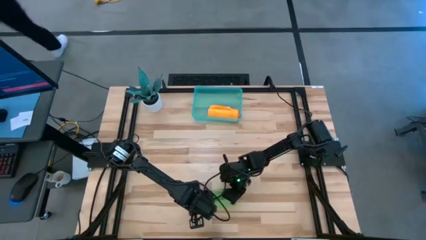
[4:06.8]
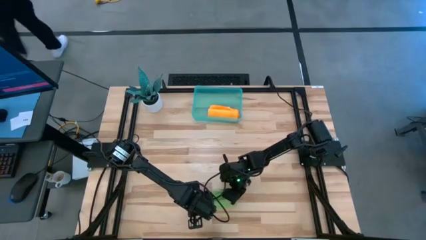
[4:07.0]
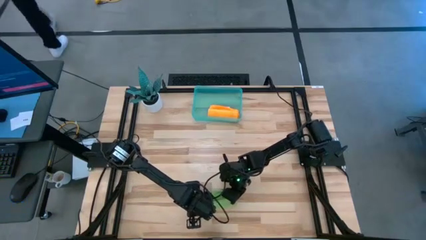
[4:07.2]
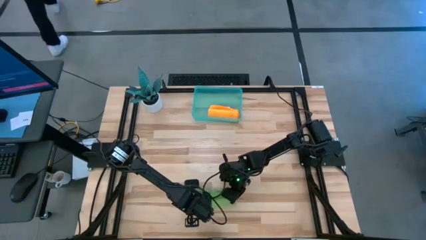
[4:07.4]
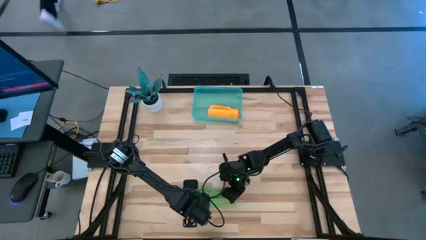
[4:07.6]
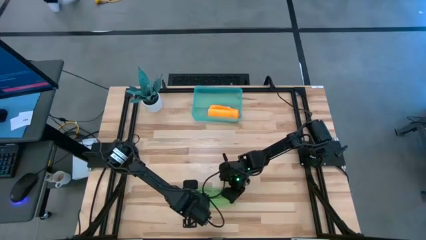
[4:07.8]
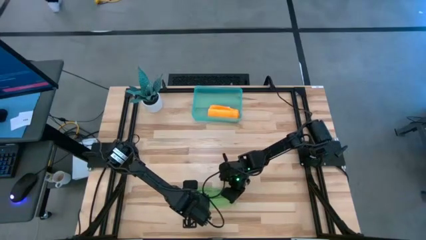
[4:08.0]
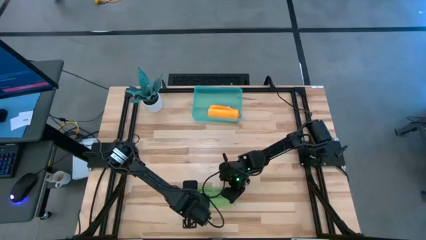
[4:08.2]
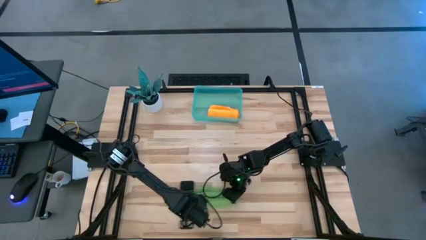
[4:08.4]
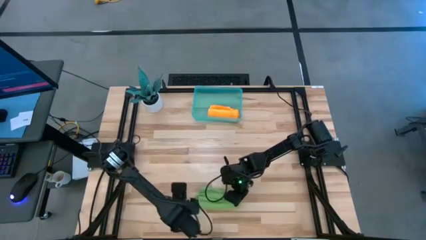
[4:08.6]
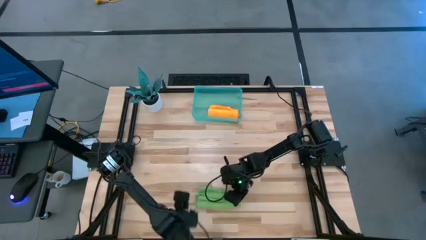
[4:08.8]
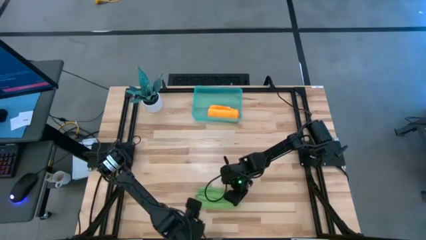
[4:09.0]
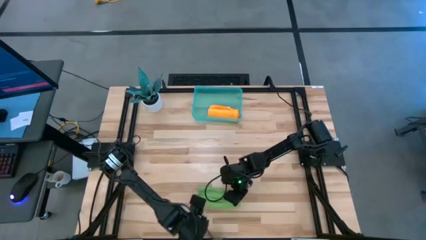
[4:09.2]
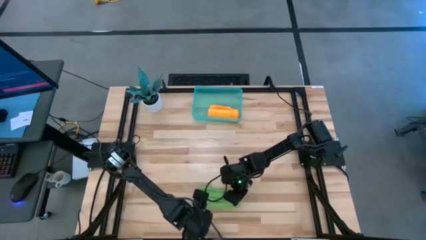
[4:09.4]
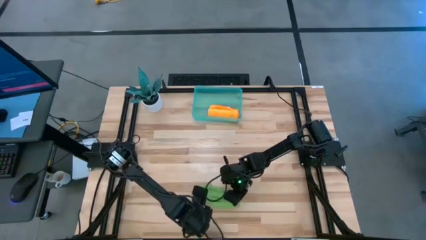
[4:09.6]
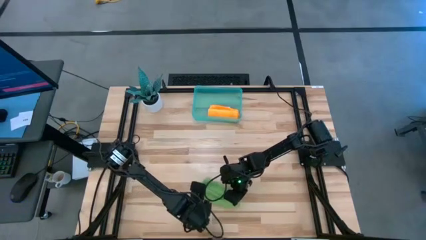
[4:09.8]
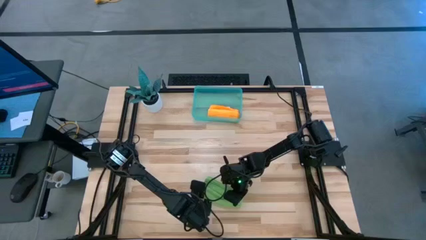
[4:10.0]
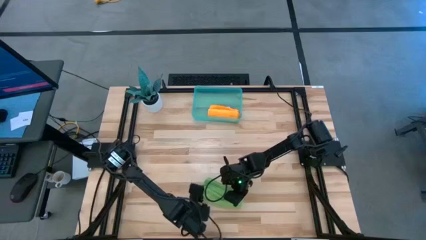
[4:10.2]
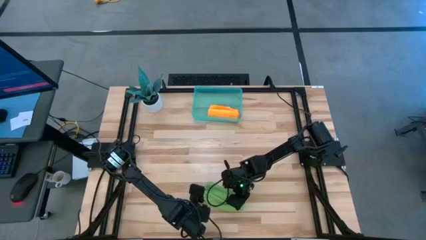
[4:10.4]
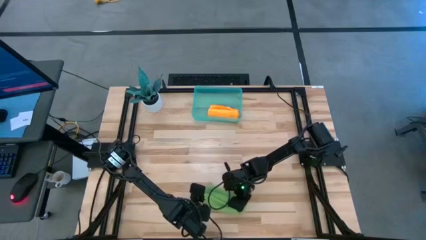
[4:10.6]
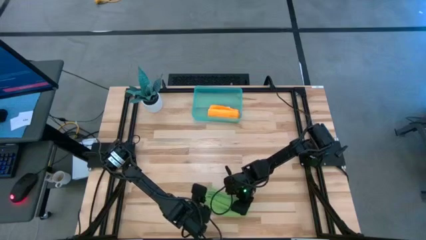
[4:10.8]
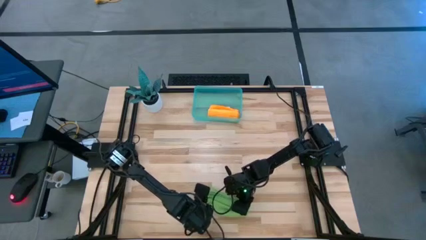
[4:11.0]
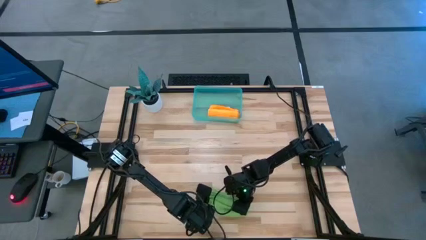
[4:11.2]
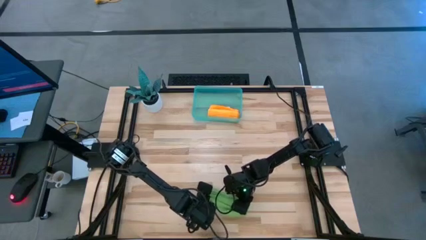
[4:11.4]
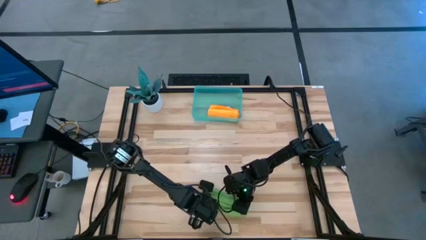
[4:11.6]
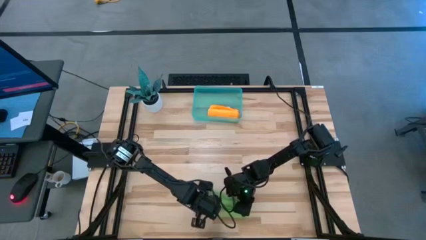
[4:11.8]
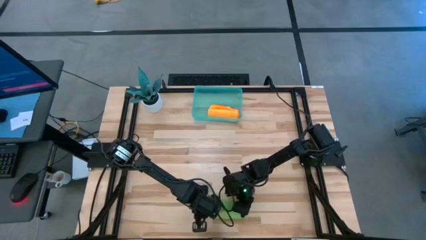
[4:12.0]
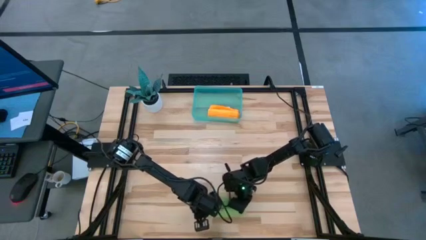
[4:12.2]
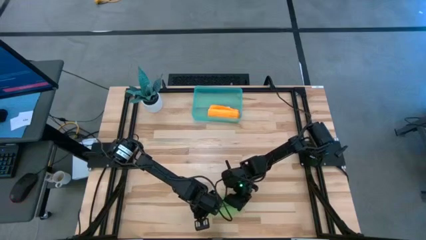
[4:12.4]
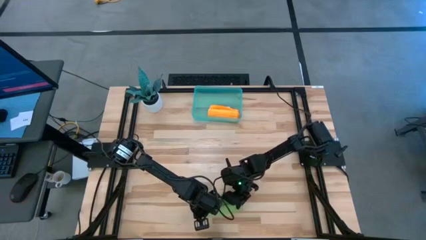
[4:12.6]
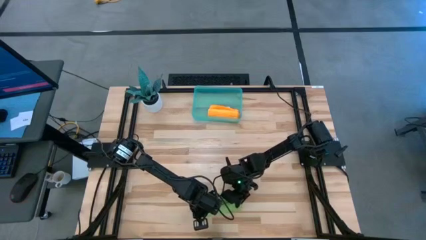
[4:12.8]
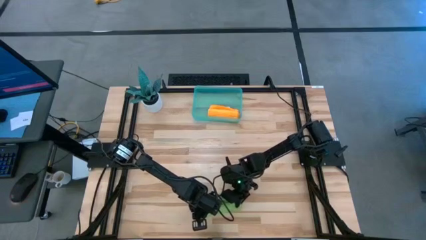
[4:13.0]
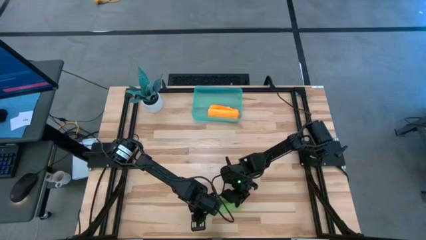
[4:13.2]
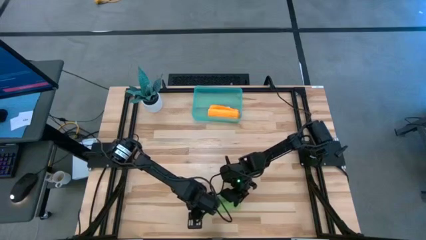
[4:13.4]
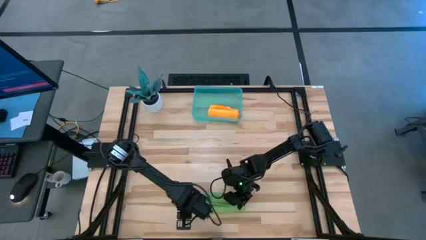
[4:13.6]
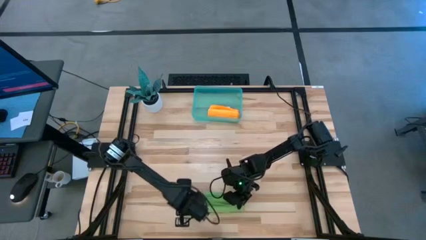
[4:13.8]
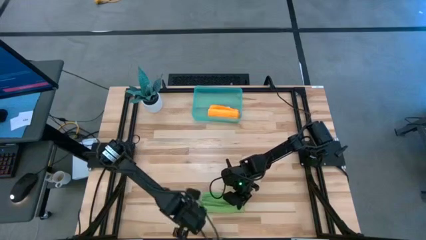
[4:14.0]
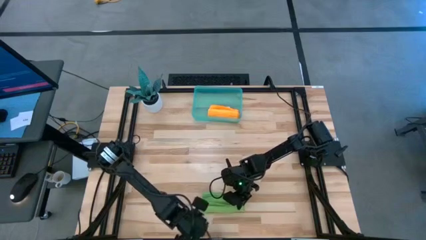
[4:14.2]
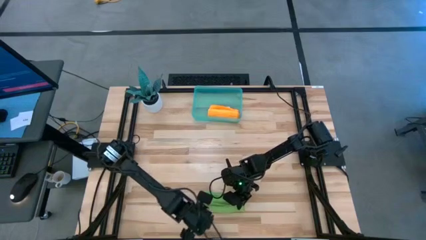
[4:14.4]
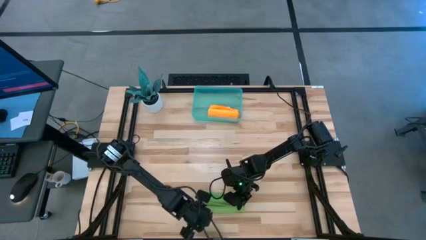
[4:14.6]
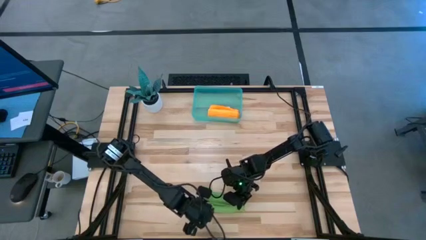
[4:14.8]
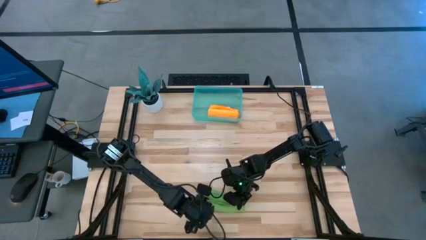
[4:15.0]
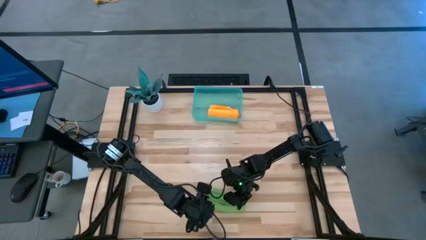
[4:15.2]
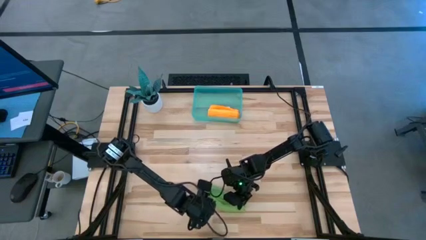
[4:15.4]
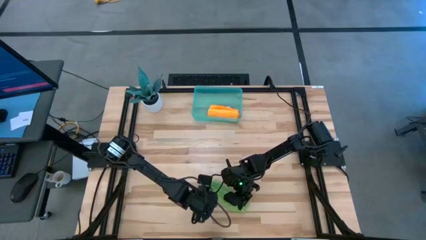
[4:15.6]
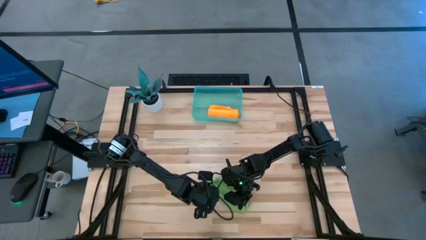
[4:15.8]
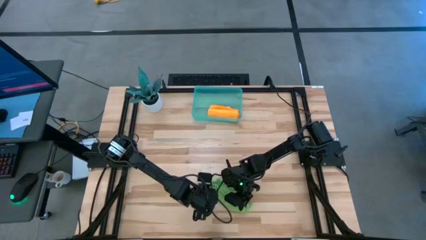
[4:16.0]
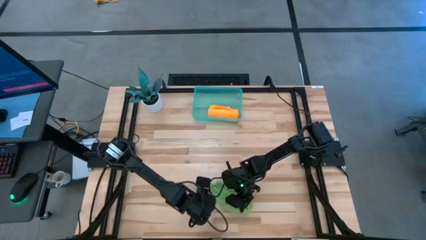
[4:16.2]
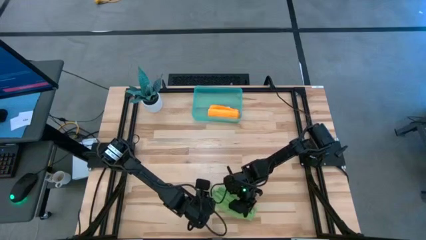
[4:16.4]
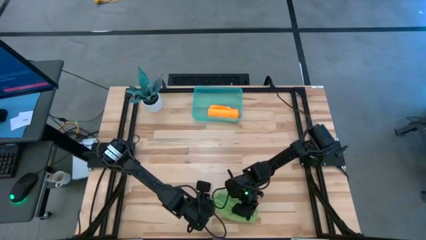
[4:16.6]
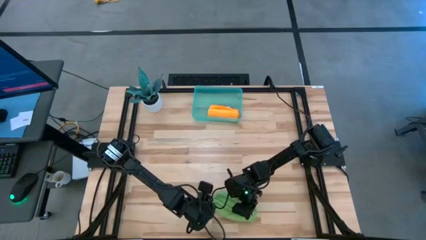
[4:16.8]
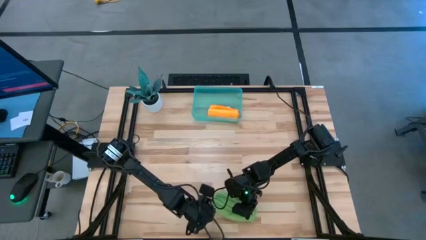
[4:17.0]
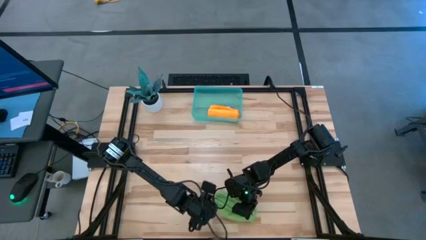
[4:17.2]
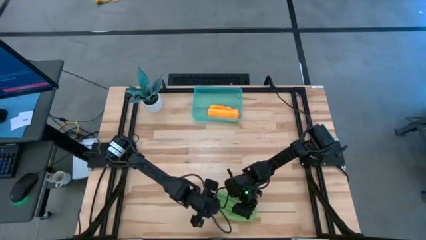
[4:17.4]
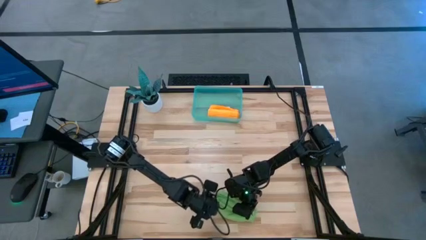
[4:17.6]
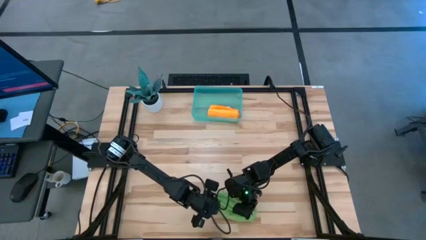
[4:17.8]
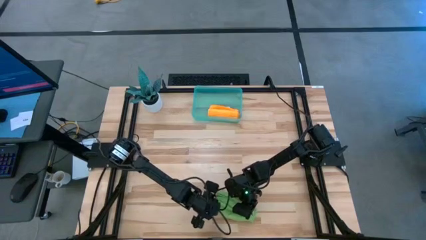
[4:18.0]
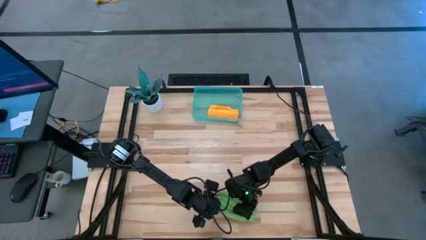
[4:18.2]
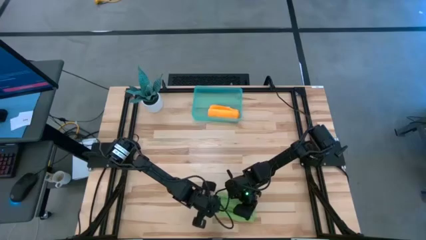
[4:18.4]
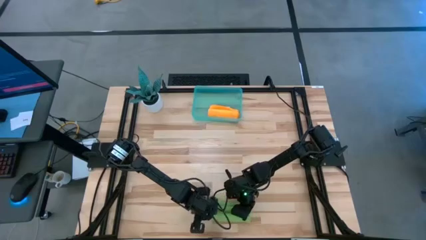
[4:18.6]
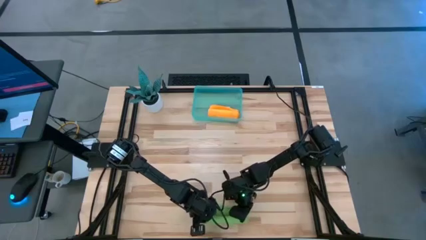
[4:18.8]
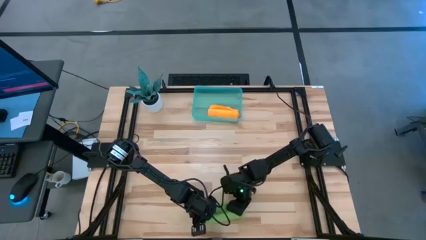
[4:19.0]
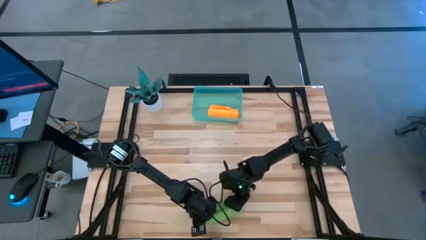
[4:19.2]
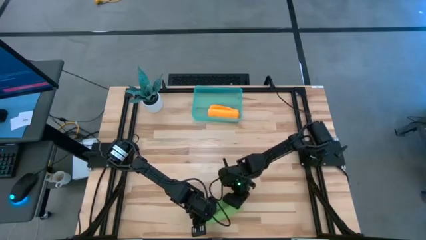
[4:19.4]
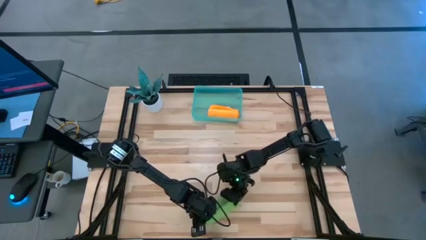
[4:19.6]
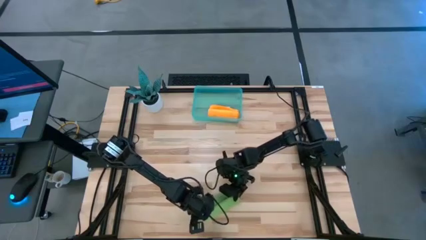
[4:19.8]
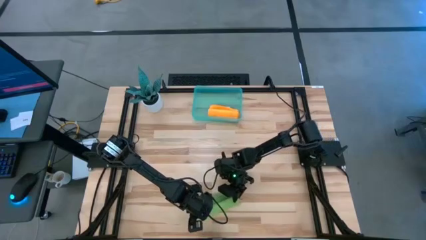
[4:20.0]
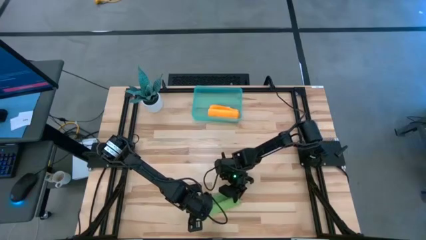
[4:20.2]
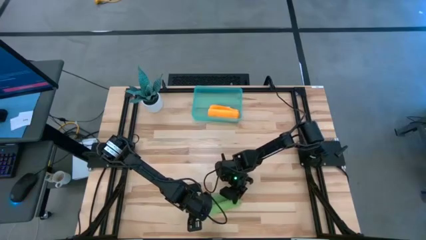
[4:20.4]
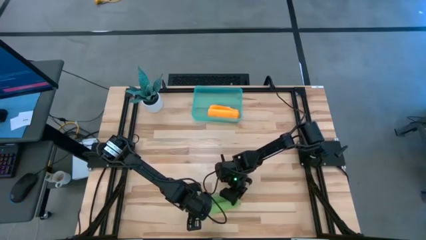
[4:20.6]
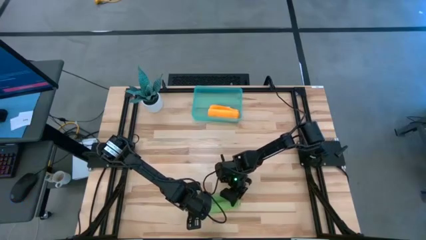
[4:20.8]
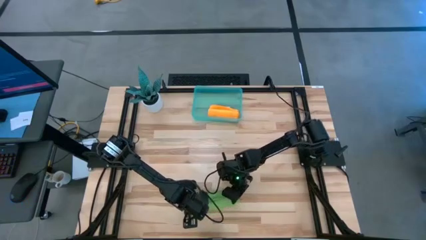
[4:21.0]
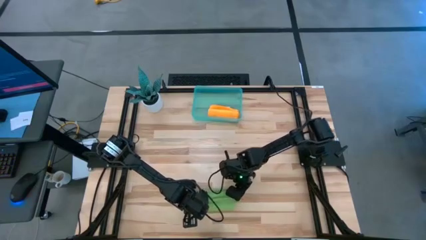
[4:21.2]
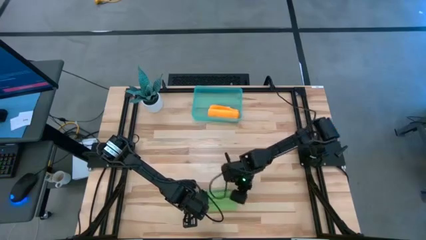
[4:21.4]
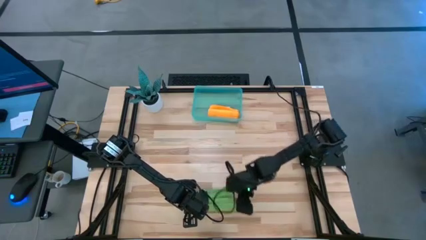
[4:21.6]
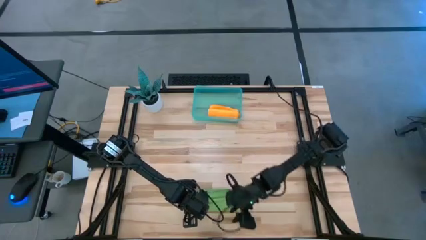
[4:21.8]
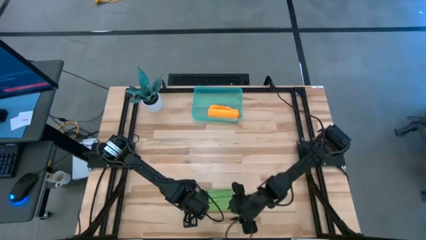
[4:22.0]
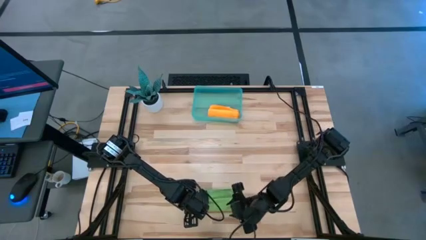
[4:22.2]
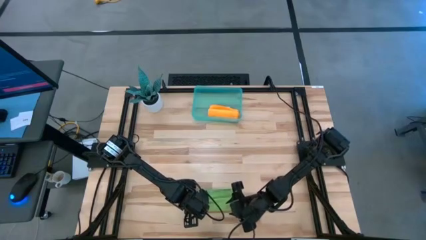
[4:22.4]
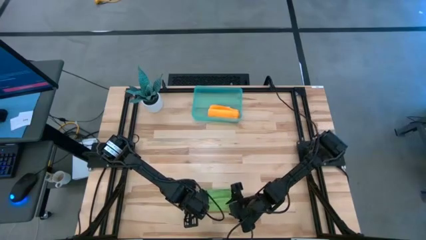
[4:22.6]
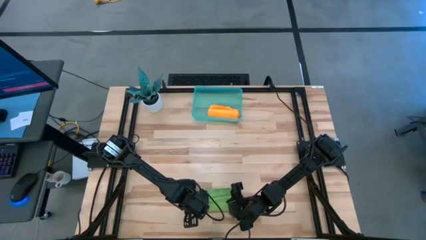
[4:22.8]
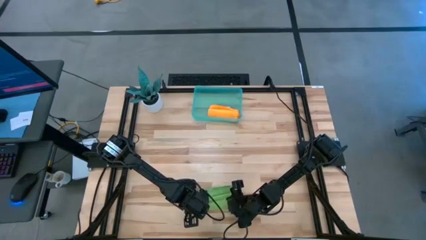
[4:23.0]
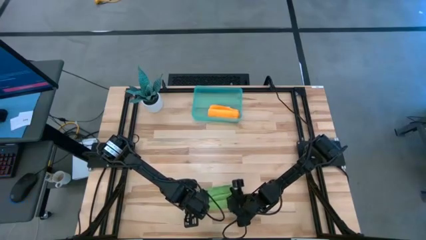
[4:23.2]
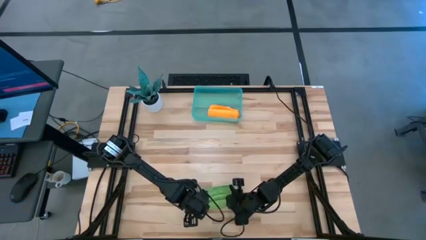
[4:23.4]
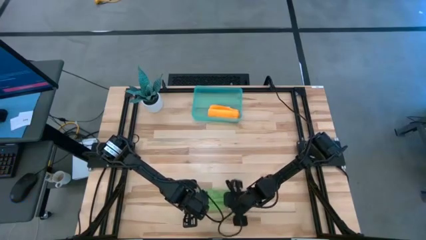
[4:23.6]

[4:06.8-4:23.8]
Task: Roll microfiber towels into tight, uniform cylinder then place into a basket
Roll the green microfiber cloth
